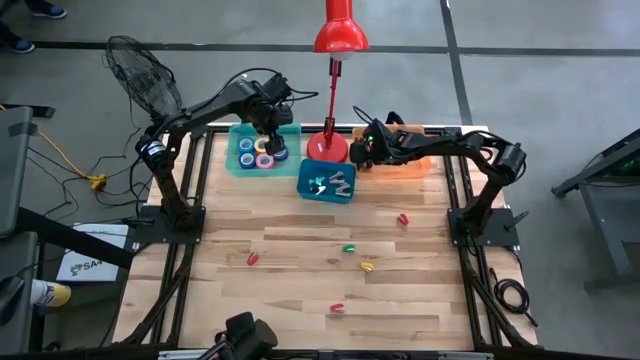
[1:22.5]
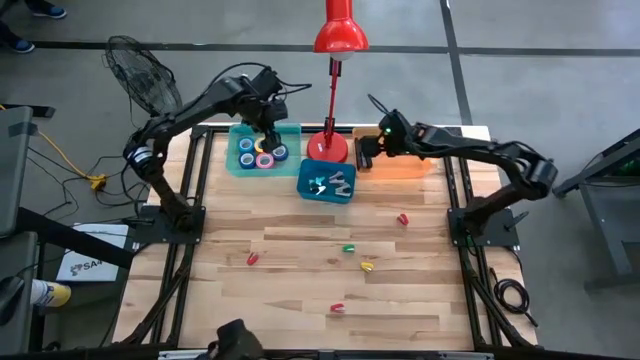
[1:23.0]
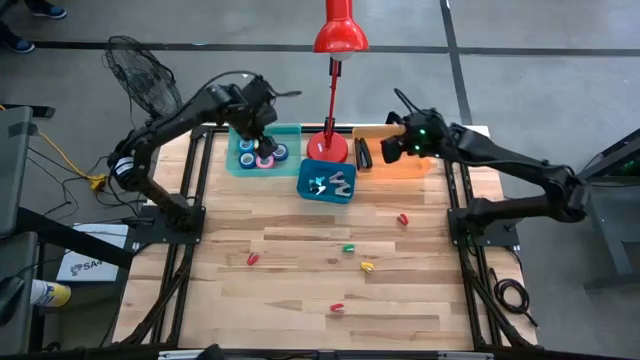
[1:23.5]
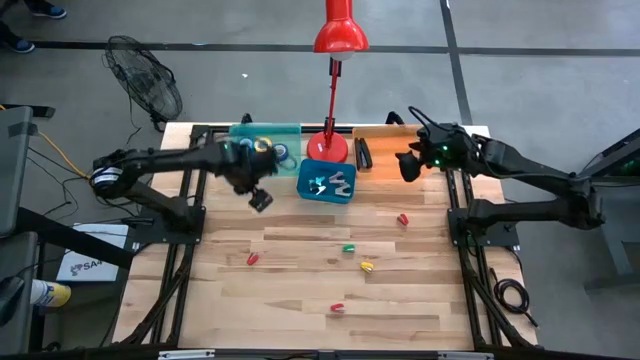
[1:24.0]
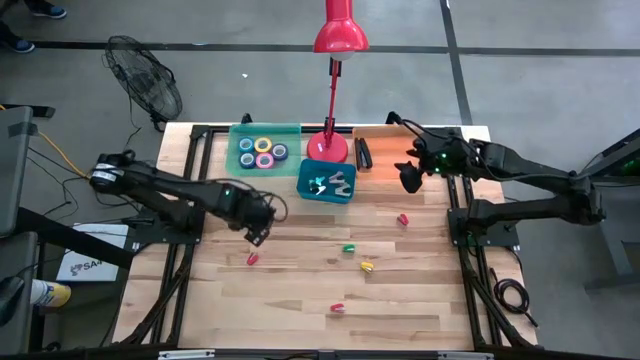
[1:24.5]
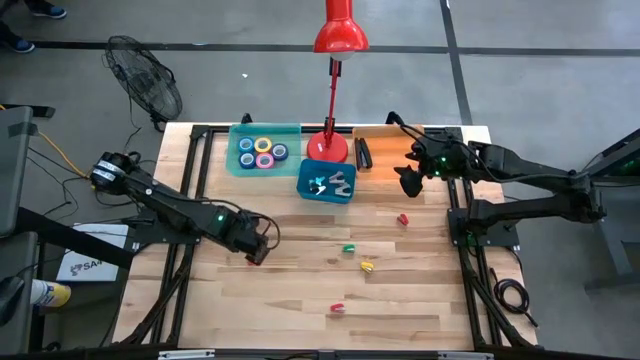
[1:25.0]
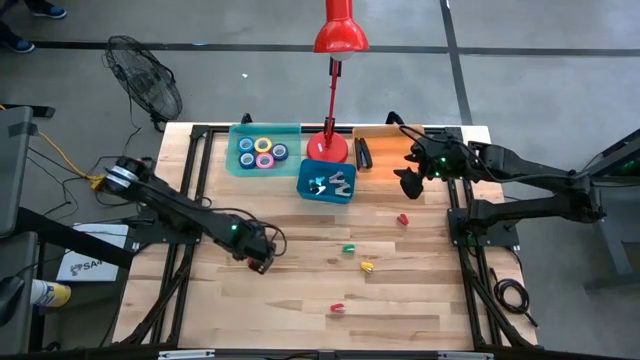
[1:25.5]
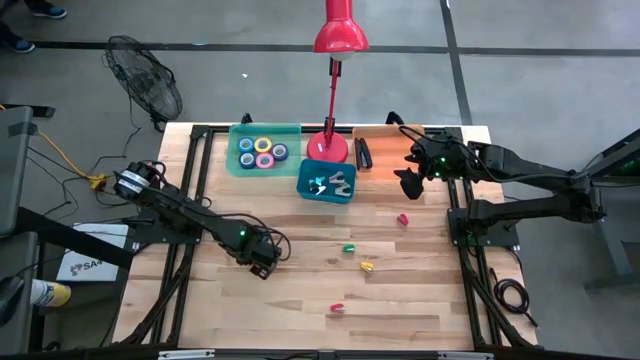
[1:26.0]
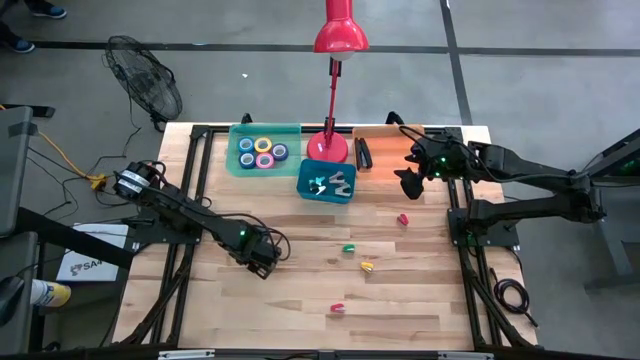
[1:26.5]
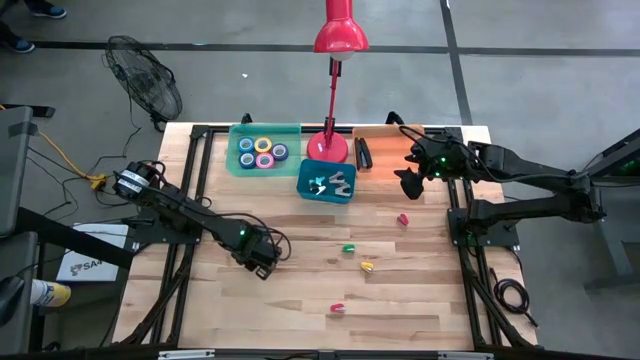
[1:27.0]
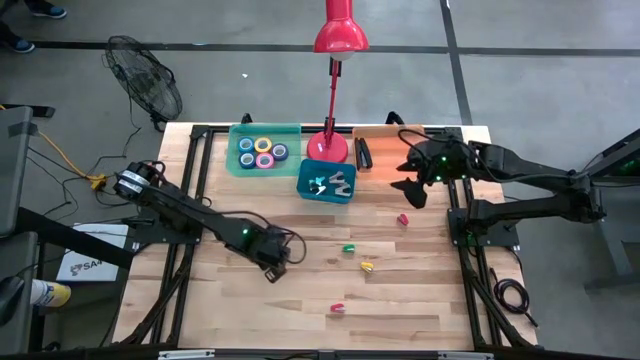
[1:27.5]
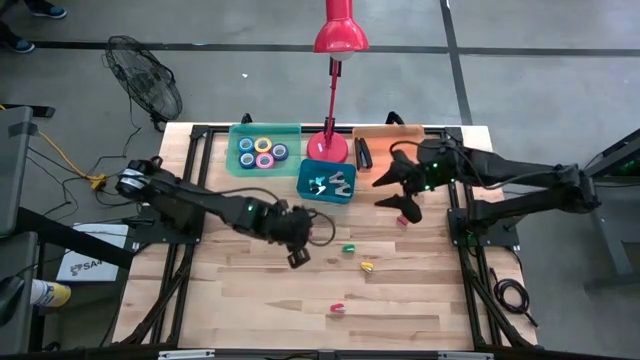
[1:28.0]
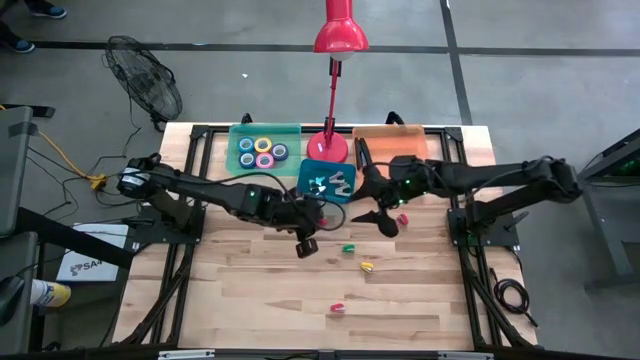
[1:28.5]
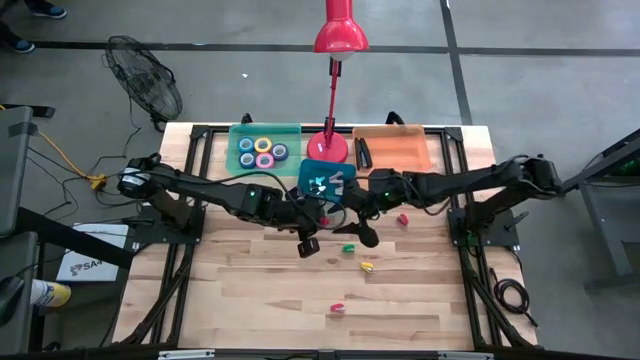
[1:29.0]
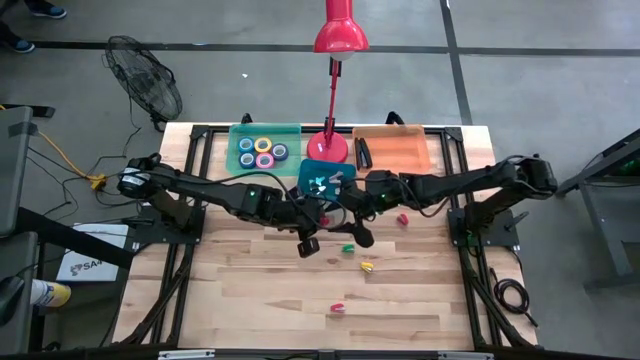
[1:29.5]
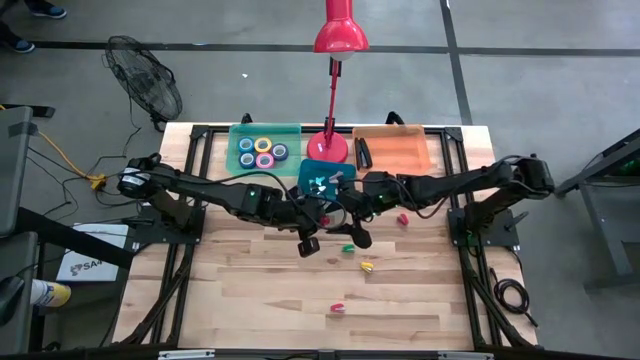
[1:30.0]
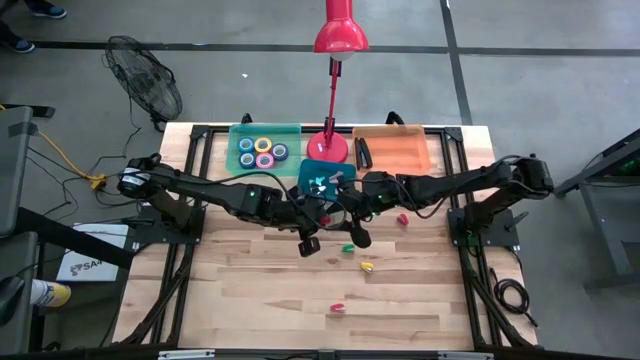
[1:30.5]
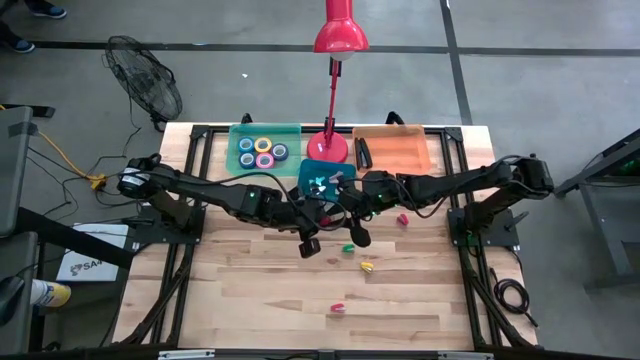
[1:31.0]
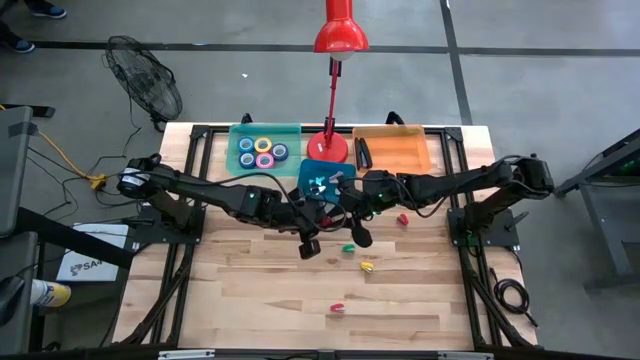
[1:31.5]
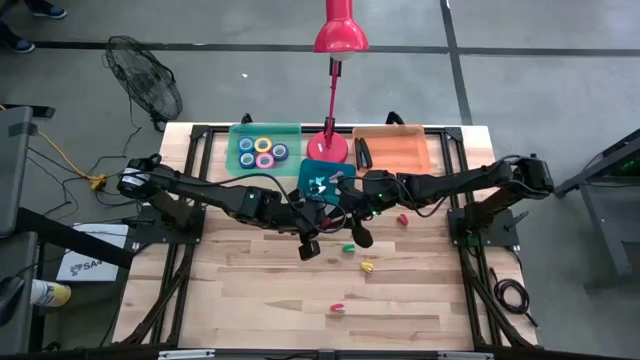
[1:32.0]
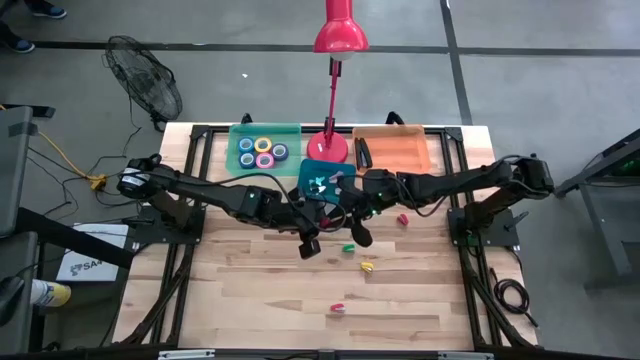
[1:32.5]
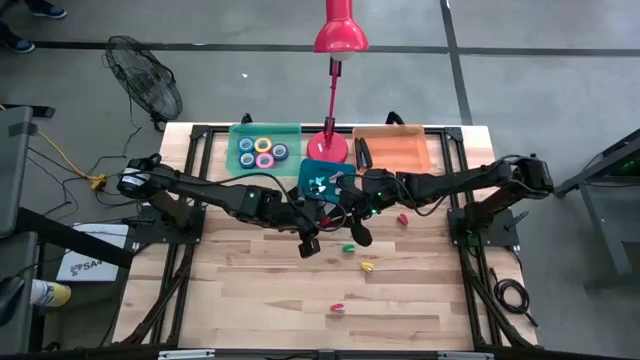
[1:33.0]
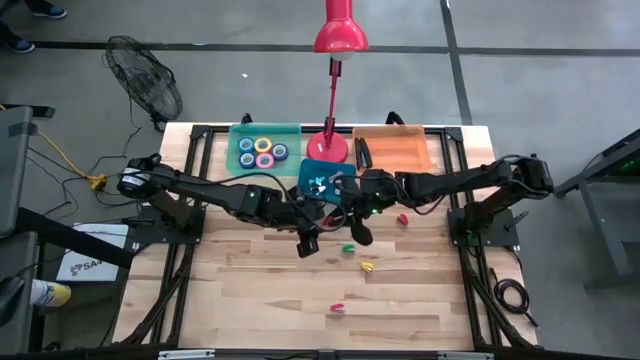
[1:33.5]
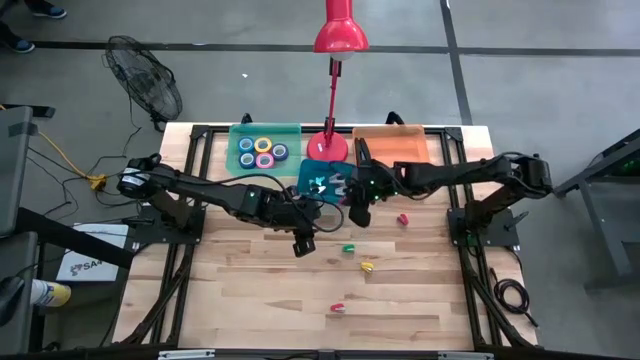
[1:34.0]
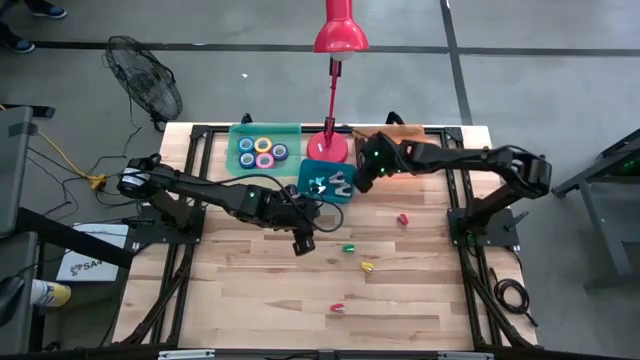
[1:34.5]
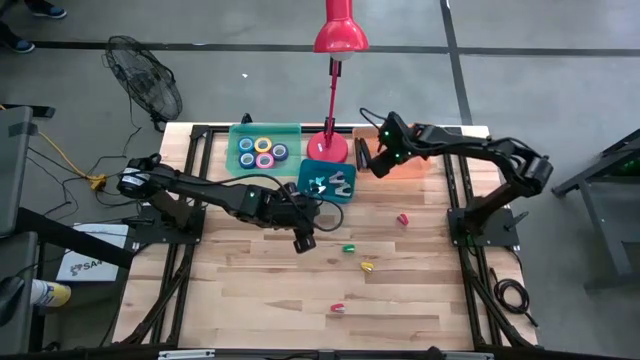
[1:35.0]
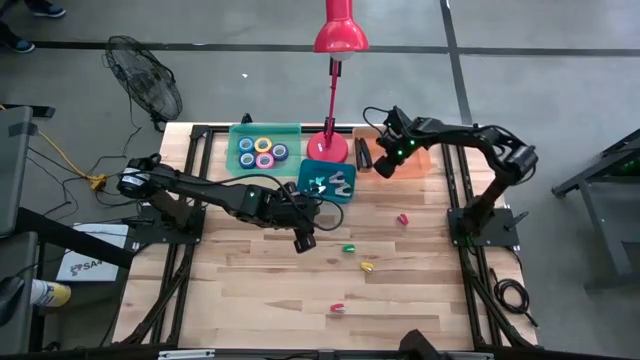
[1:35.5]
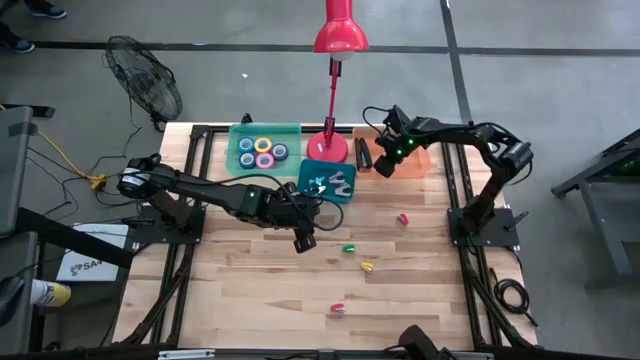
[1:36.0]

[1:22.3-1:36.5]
Task: Pick and place Stapler, Stapler remover, tape
Put the middle left red stapler into the orange bin

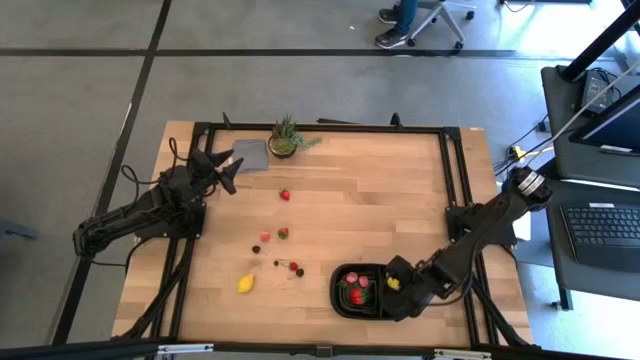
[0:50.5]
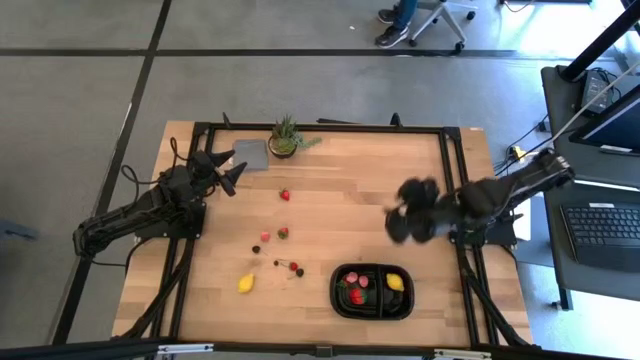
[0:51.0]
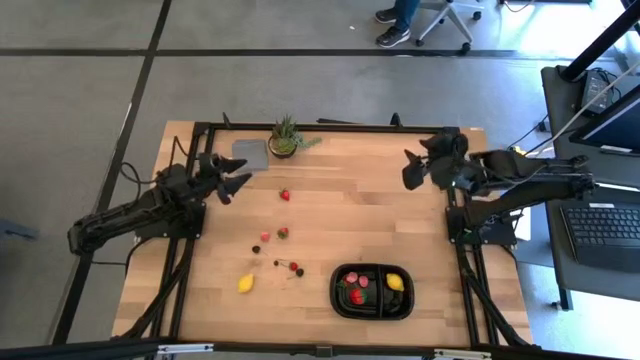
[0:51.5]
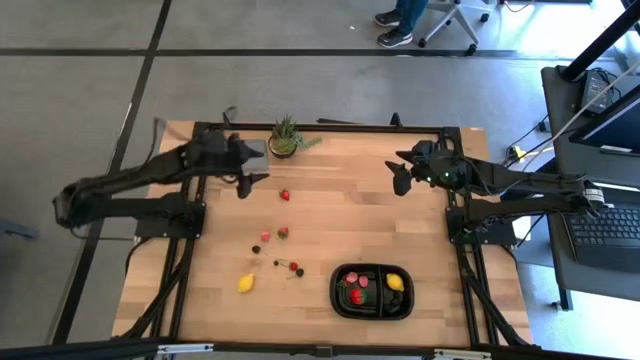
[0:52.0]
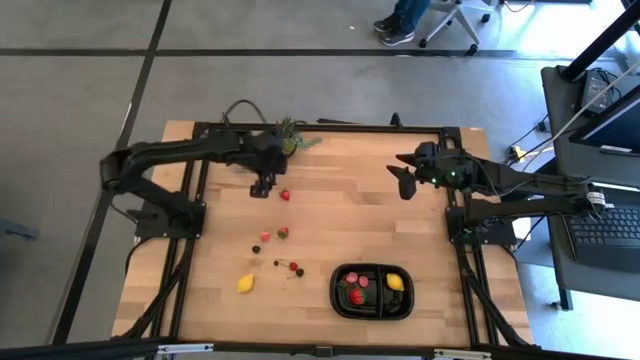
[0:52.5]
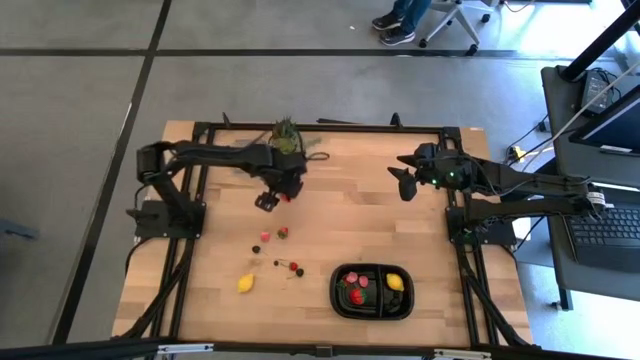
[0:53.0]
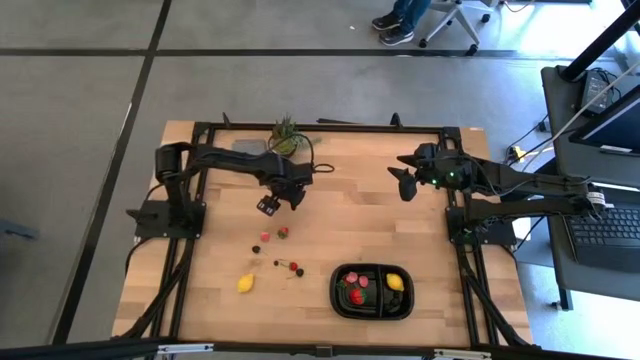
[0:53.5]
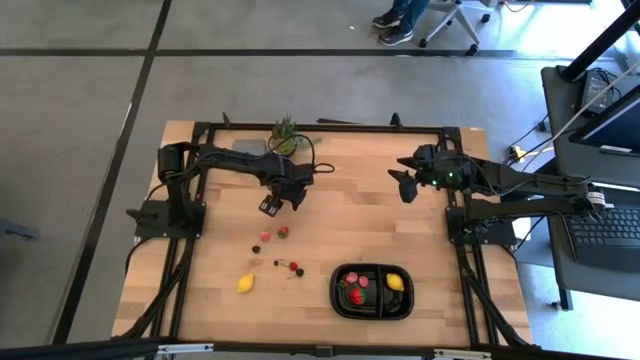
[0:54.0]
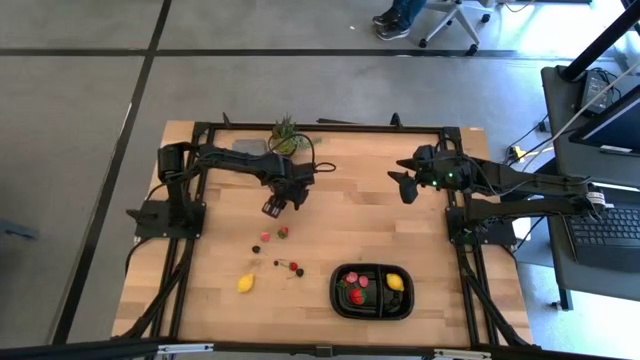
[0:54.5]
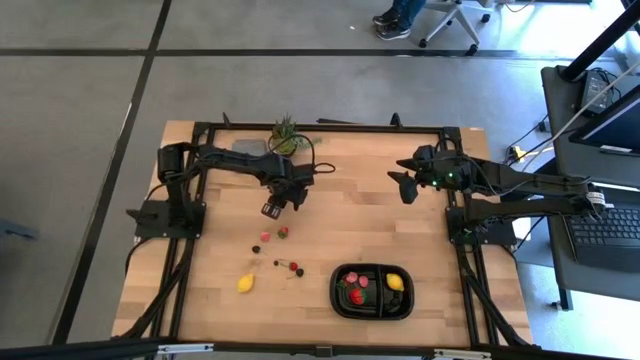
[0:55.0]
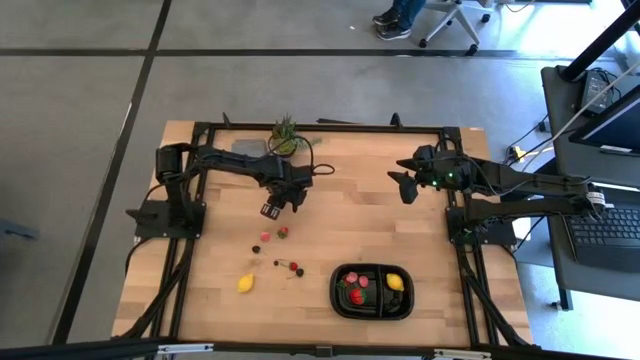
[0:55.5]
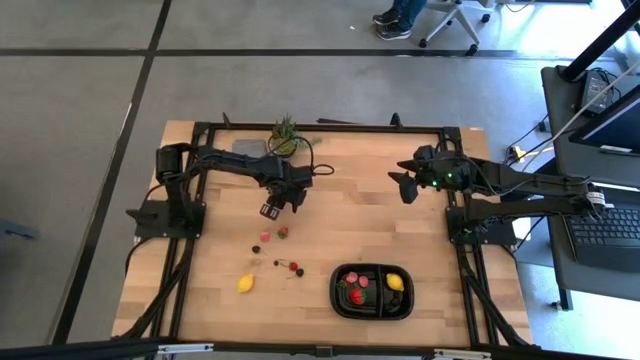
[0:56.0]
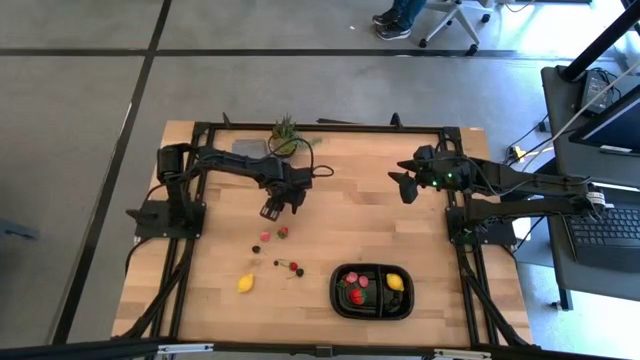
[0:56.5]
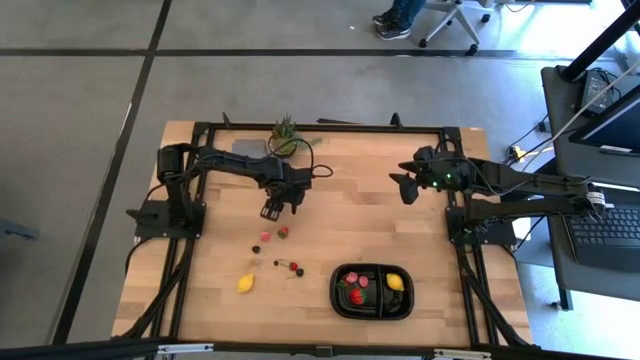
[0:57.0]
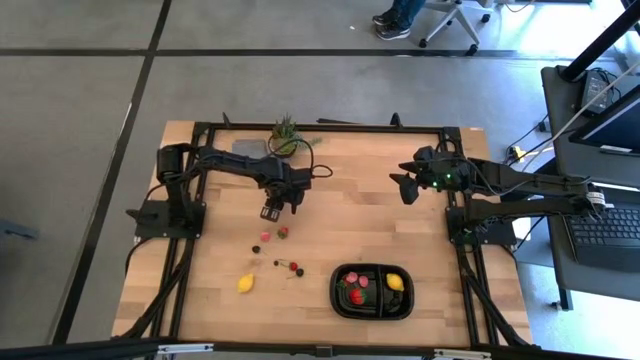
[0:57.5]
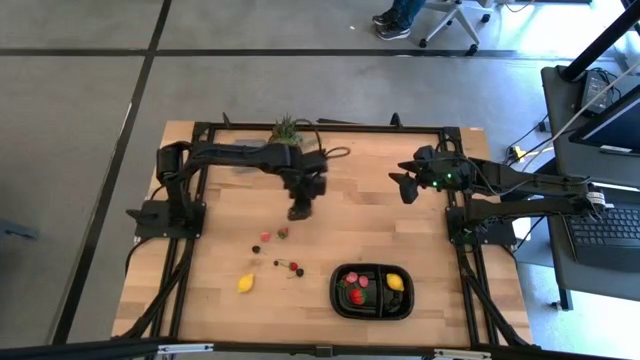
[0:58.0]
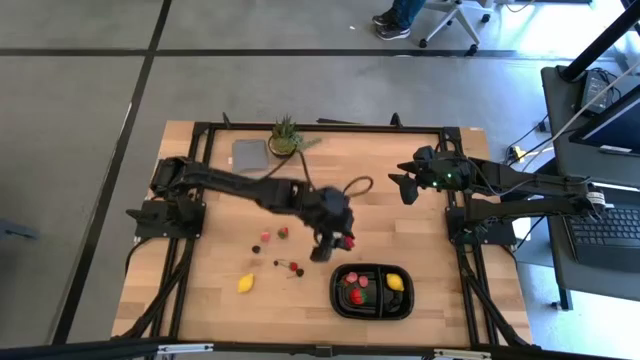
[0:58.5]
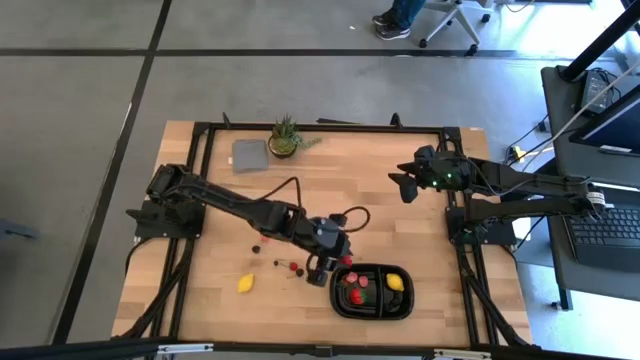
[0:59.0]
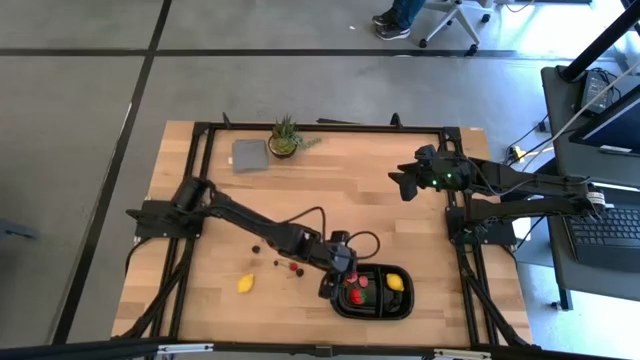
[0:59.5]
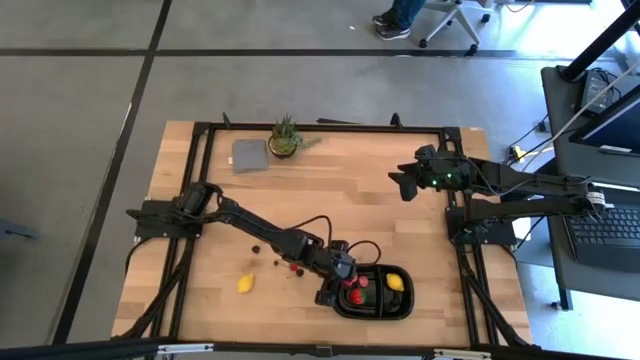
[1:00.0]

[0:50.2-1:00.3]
Task: Pick and placing Produce into tupperware
Put the red strawberry into the black bin
